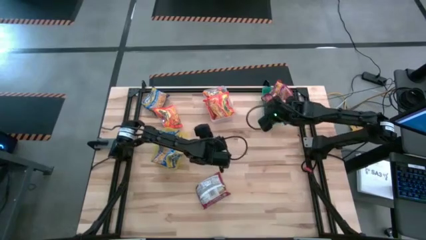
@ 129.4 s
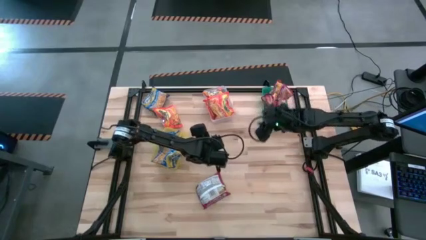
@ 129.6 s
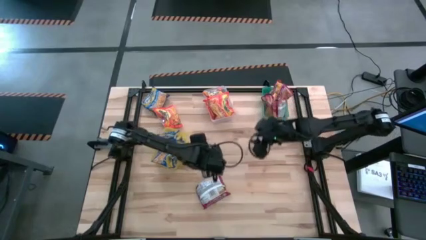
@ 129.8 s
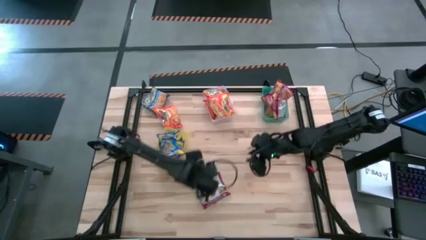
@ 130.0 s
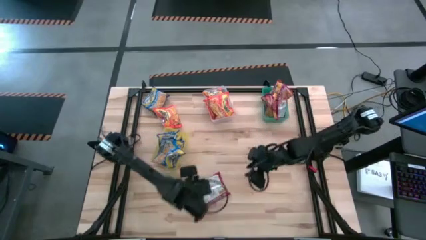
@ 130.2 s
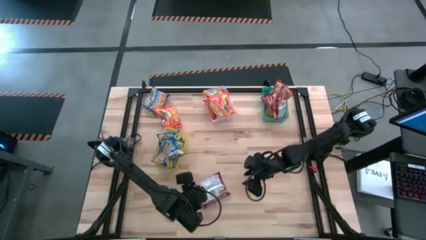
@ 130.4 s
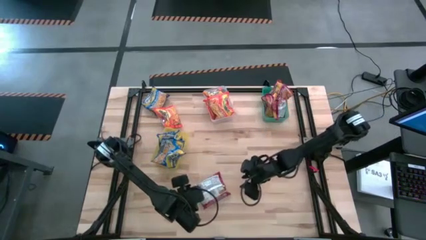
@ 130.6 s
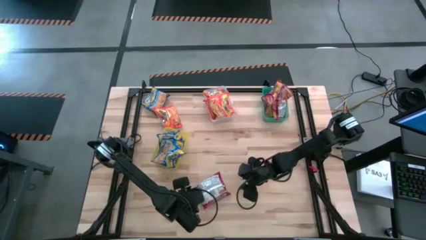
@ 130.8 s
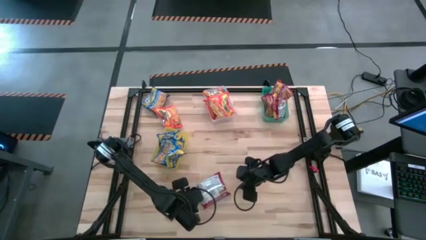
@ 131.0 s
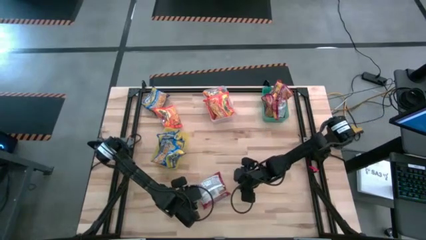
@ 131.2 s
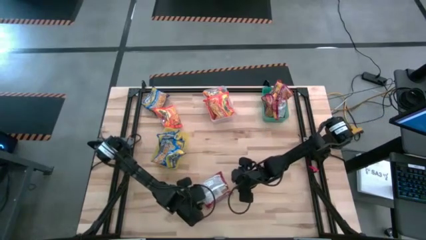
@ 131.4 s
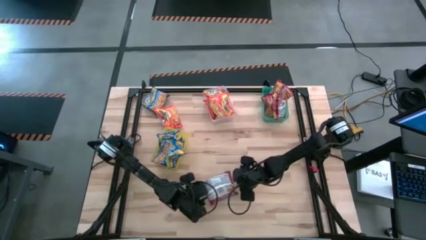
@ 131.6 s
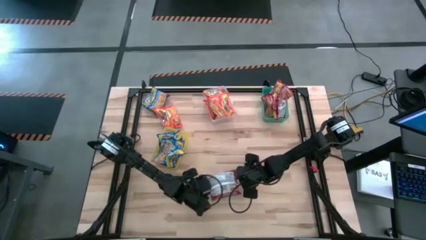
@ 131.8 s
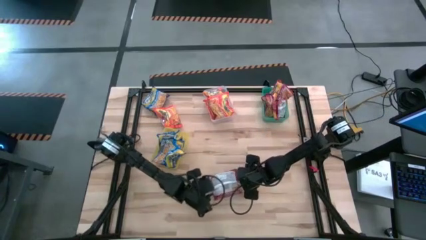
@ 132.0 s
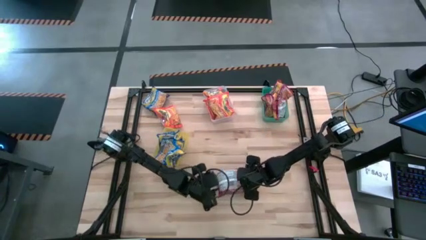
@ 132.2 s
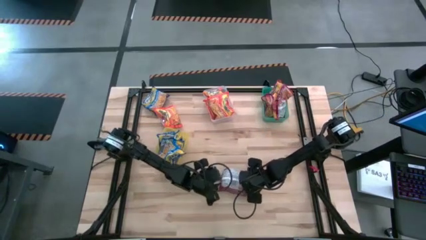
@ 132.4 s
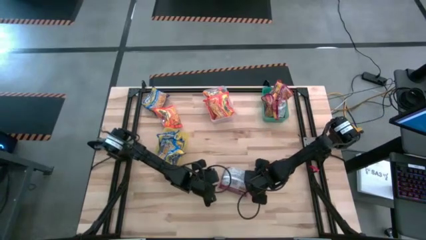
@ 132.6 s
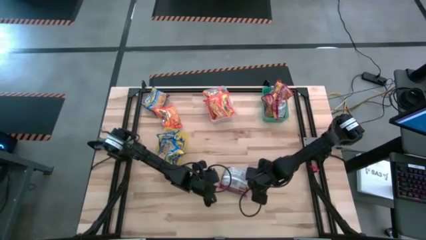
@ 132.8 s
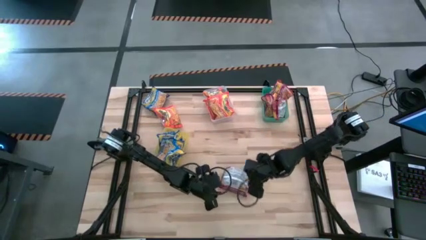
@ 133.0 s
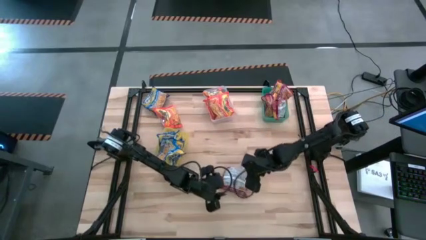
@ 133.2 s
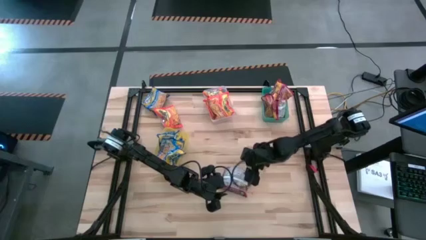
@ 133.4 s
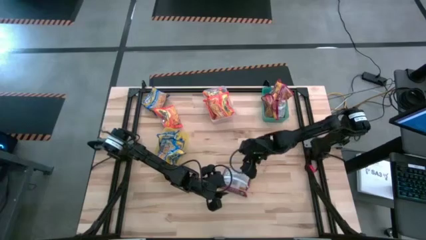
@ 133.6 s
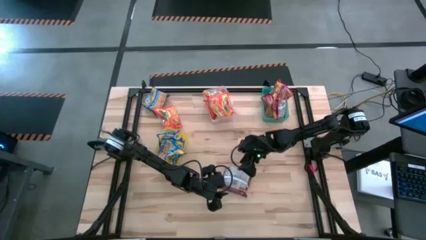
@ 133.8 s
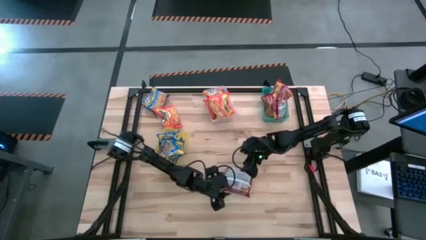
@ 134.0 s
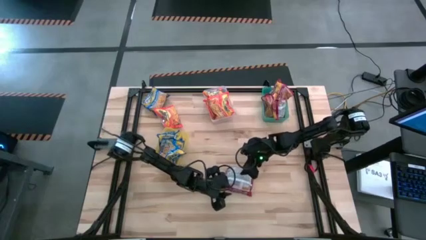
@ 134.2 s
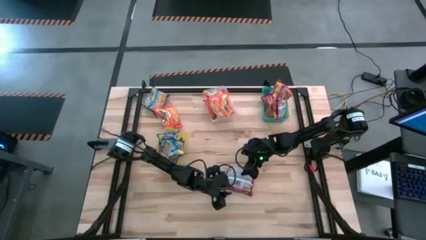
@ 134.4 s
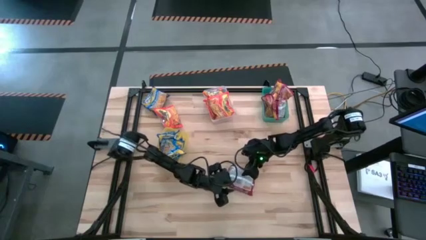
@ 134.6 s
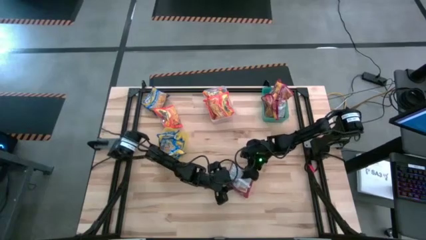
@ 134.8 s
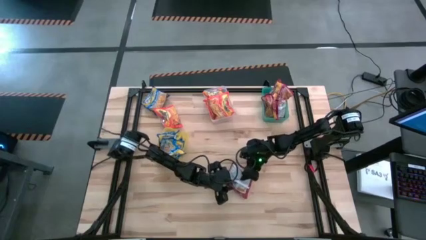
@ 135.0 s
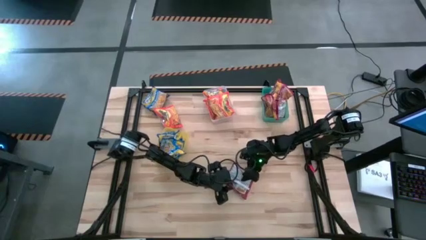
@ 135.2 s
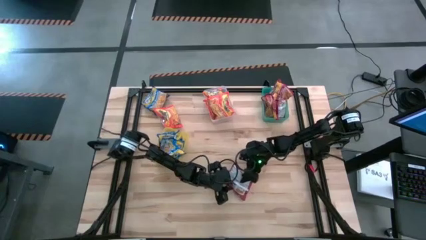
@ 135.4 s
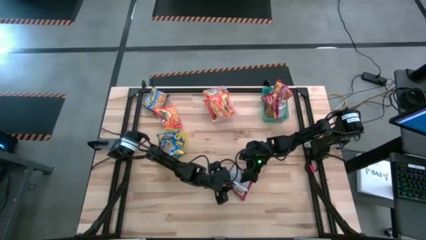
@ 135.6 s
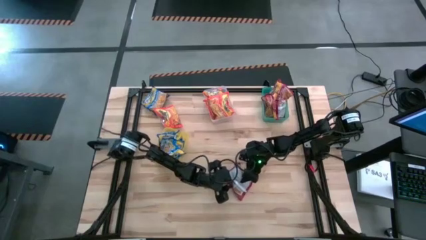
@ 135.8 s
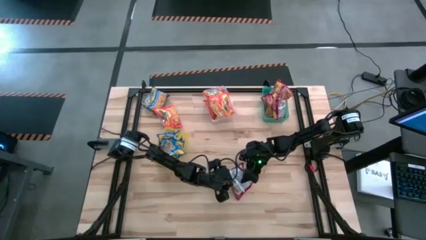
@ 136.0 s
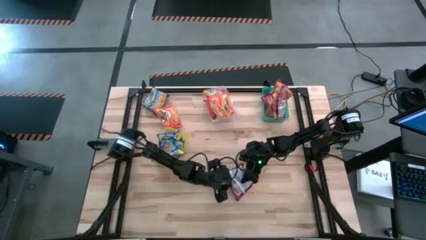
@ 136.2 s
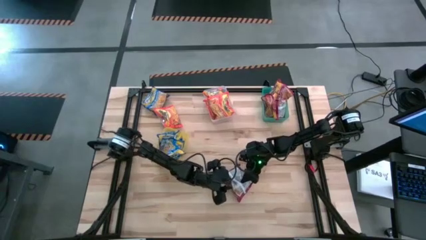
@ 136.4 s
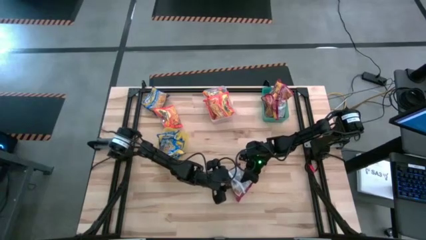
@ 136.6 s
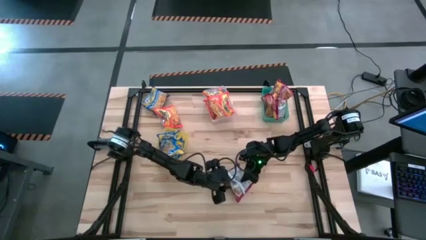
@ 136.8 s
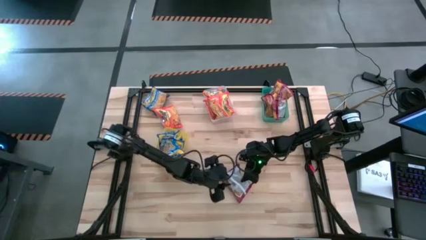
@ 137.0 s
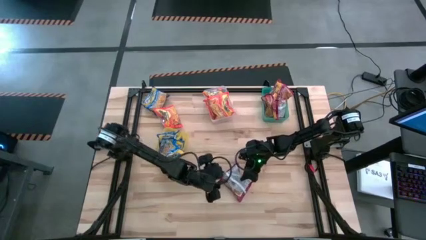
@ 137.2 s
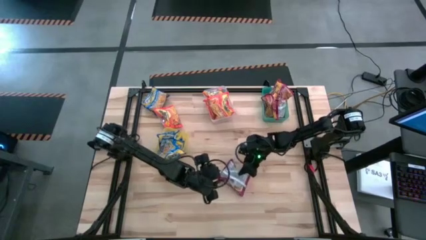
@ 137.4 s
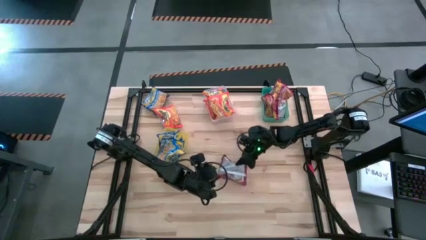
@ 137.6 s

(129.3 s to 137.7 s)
Task: Sort Maruchan noodles
Put the red noodle pack into the green bin

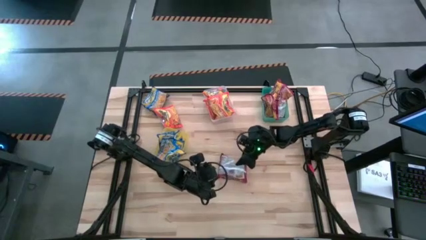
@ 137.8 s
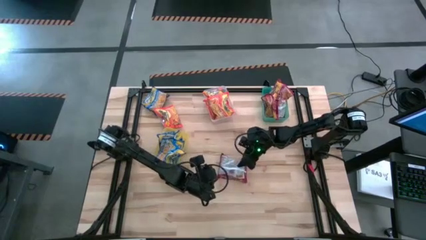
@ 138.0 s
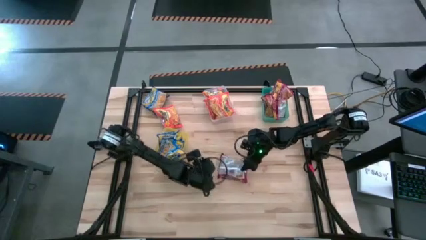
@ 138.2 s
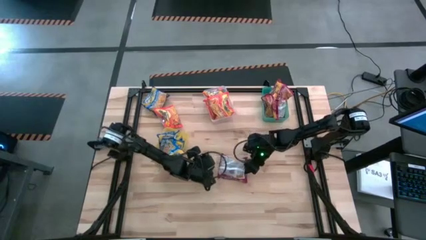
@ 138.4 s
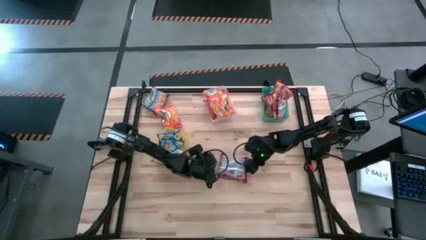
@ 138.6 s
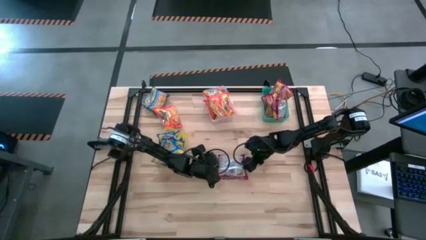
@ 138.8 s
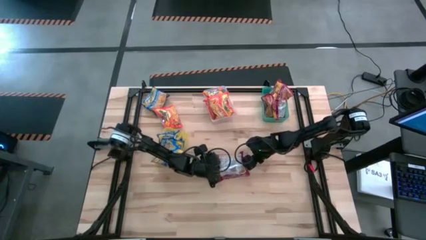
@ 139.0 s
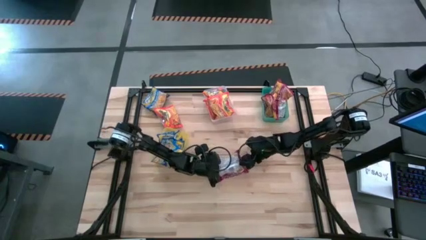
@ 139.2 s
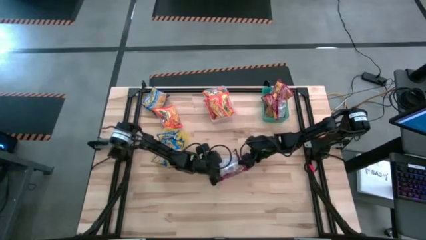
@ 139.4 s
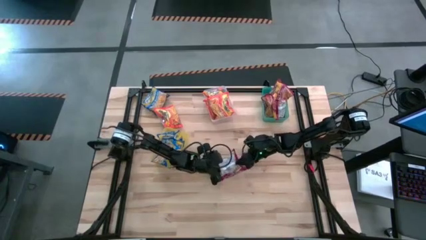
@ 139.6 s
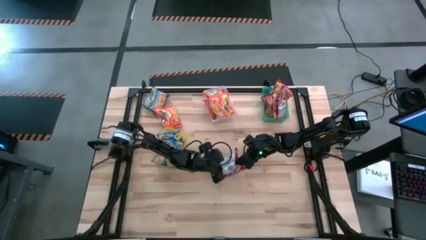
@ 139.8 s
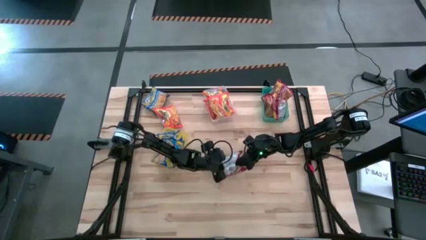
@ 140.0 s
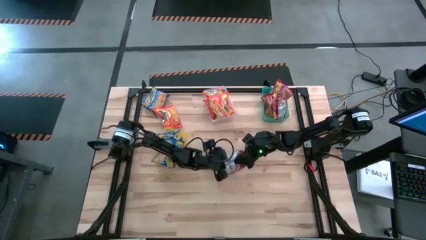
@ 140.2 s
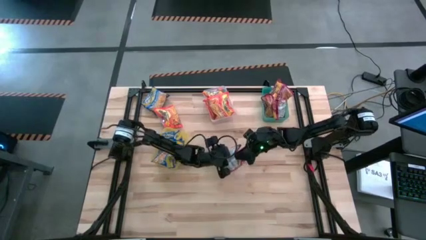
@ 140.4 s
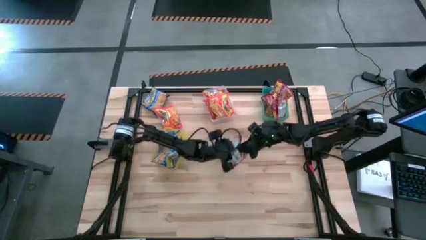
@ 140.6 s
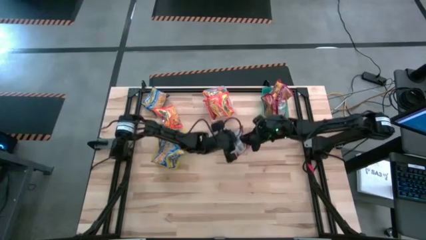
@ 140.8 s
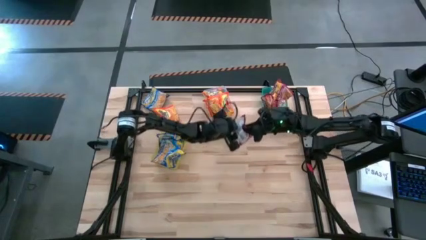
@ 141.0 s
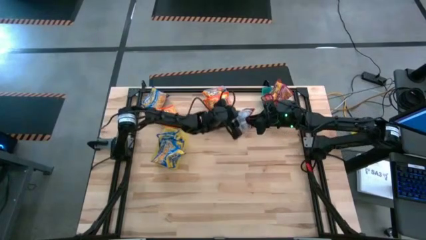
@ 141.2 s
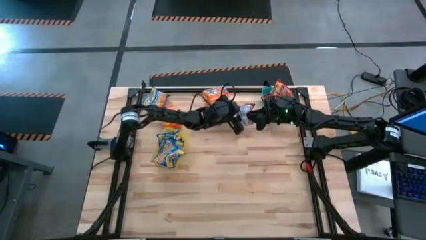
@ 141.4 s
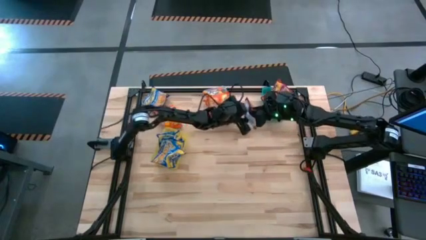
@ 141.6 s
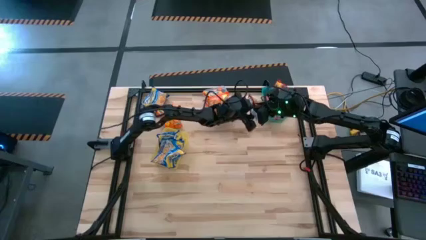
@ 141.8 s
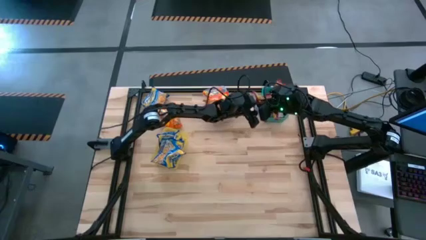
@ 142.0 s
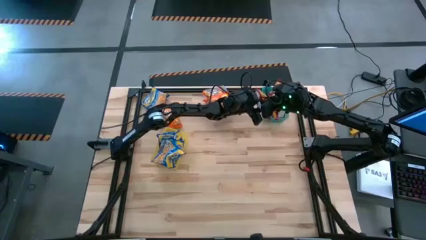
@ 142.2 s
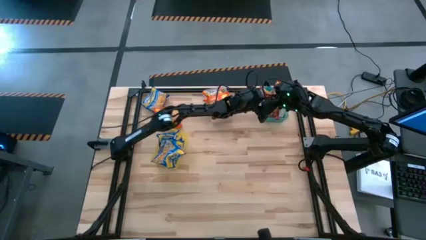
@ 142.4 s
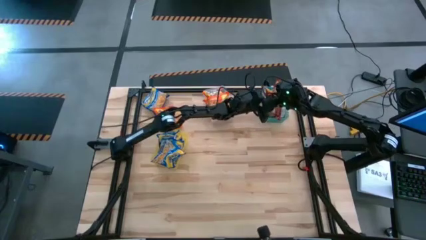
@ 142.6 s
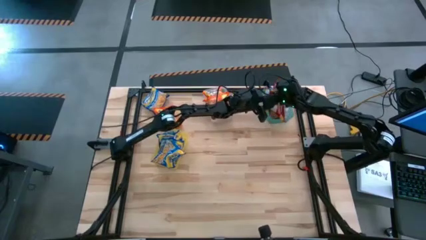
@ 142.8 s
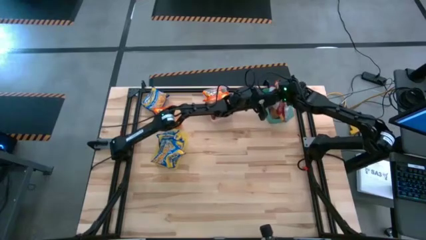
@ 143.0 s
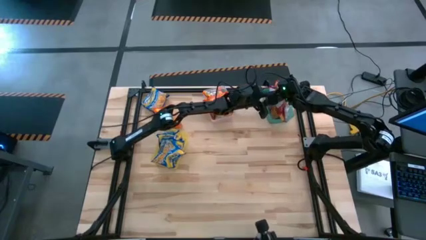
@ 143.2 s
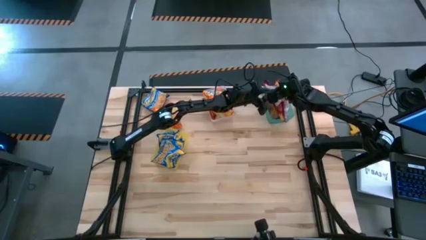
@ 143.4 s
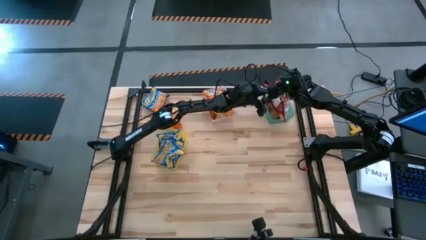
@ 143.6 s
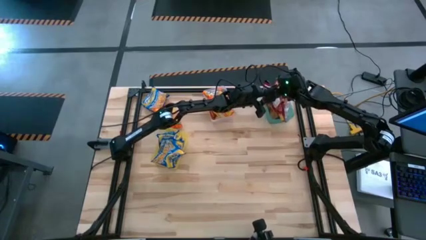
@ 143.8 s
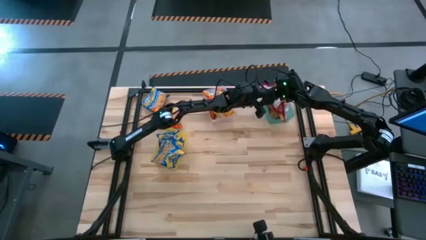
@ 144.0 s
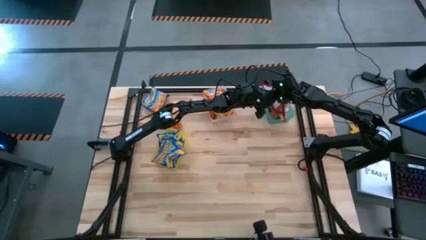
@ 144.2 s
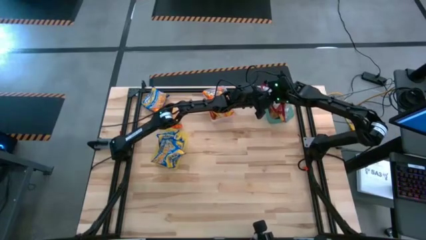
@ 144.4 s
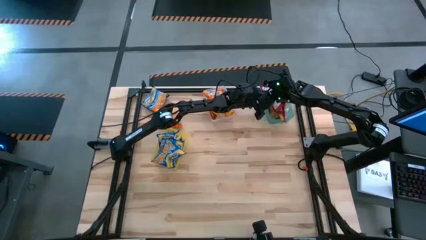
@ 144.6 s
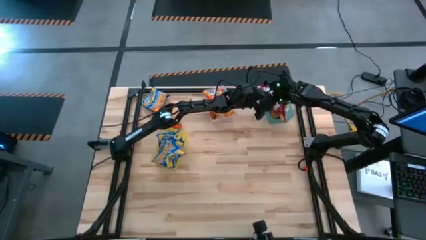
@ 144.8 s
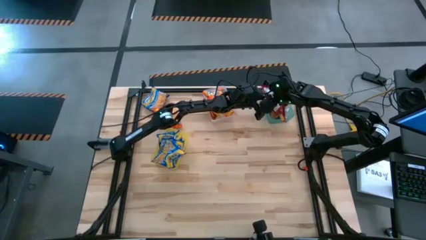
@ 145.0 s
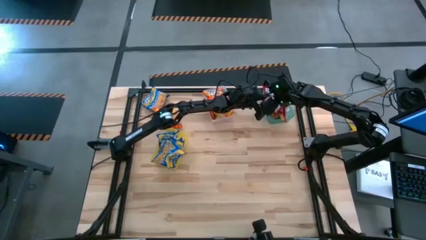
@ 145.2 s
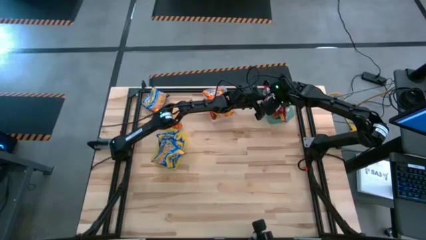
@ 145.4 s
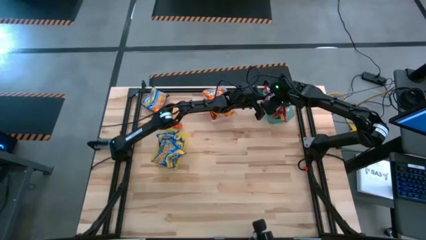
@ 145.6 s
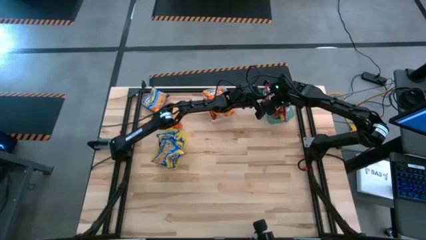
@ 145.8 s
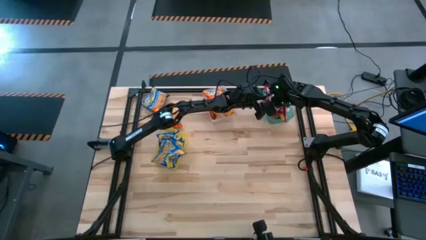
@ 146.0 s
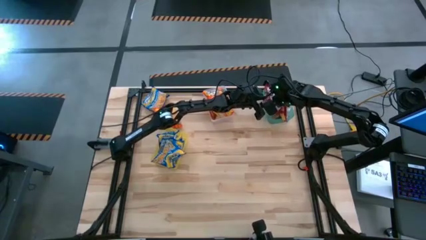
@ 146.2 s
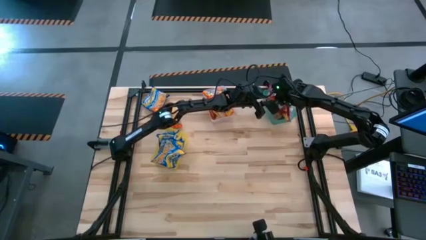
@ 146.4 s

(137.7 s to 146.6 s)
Put the red noodle pack into the green bin
